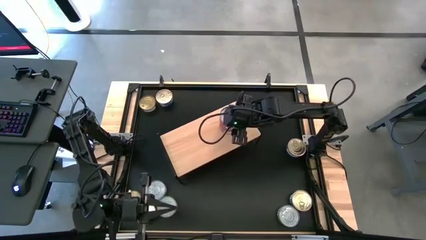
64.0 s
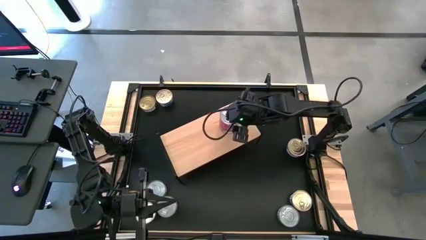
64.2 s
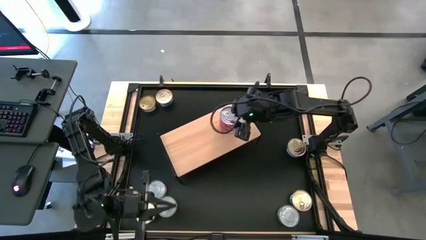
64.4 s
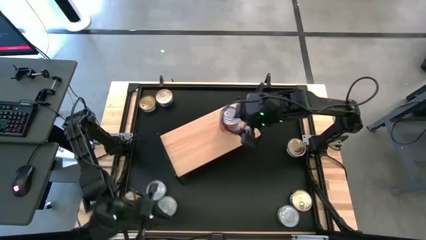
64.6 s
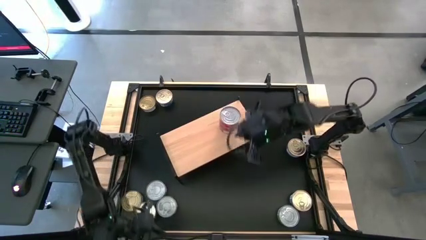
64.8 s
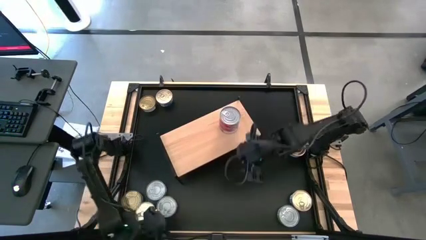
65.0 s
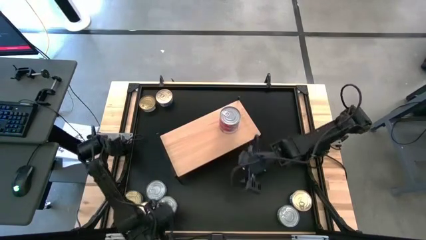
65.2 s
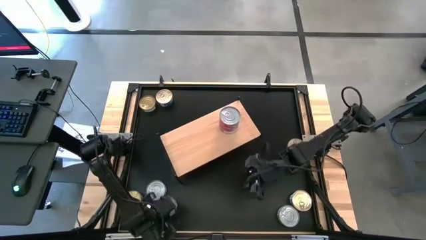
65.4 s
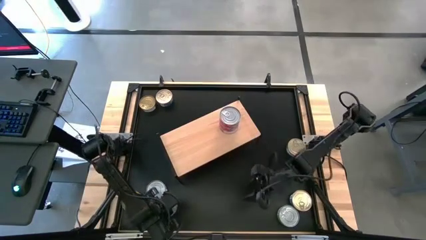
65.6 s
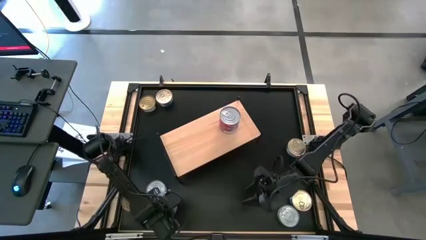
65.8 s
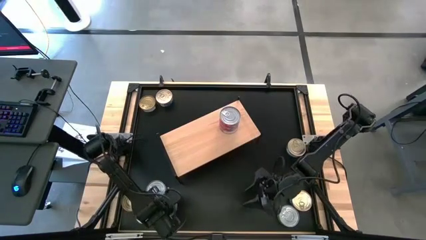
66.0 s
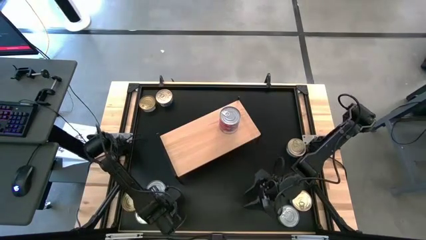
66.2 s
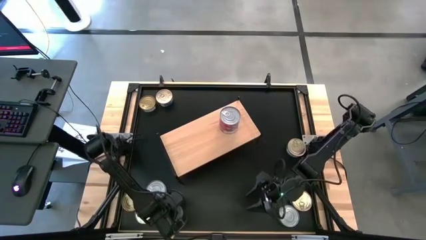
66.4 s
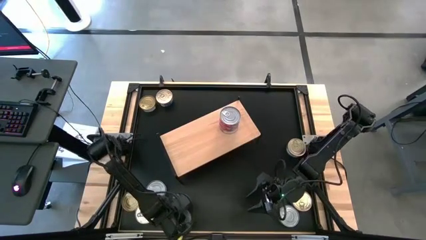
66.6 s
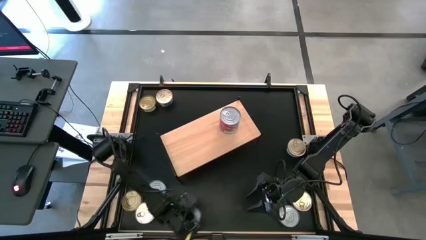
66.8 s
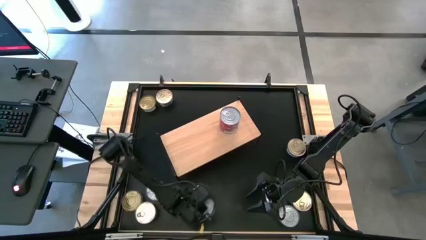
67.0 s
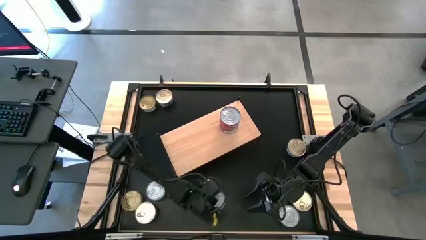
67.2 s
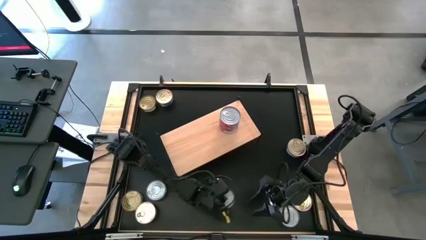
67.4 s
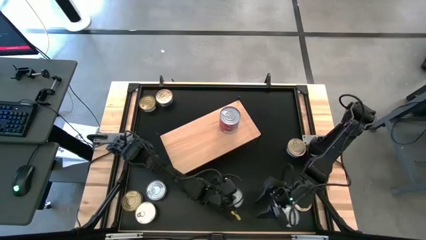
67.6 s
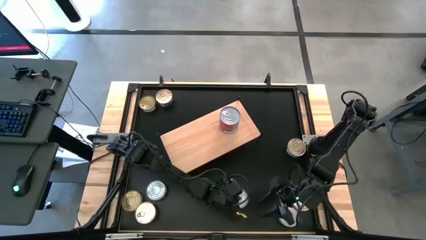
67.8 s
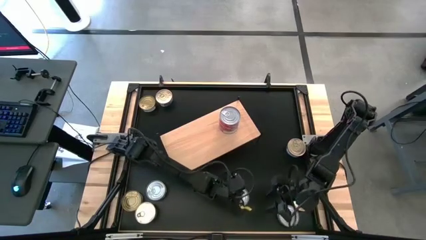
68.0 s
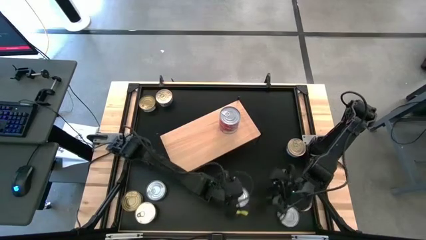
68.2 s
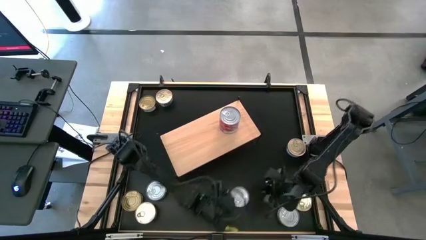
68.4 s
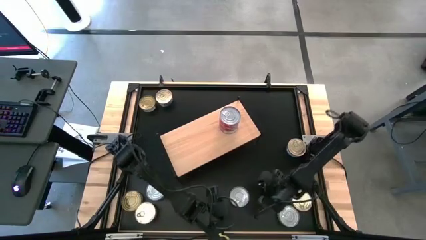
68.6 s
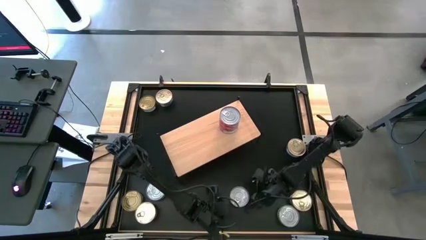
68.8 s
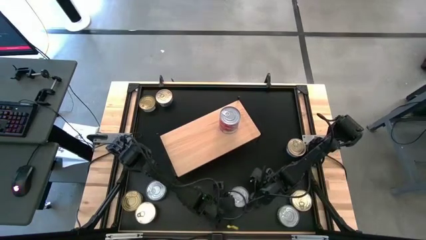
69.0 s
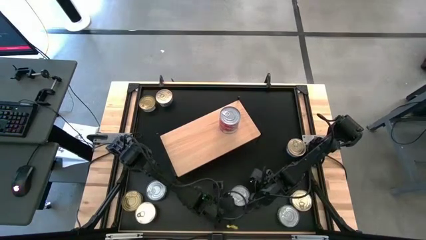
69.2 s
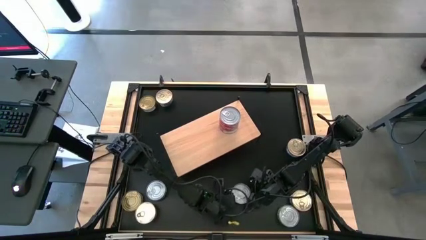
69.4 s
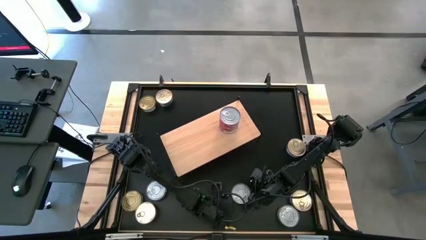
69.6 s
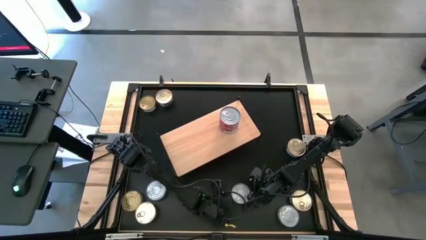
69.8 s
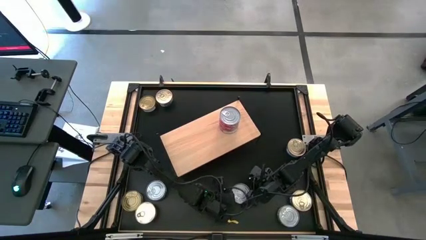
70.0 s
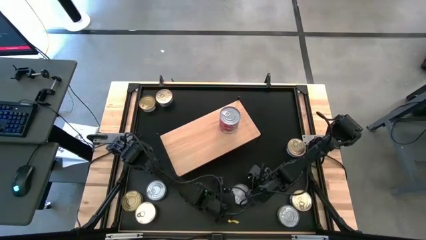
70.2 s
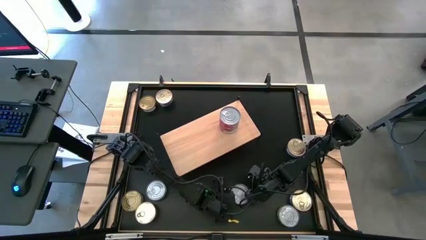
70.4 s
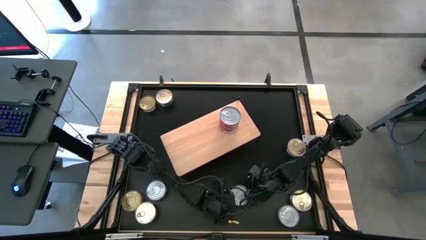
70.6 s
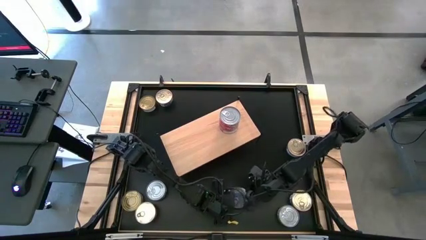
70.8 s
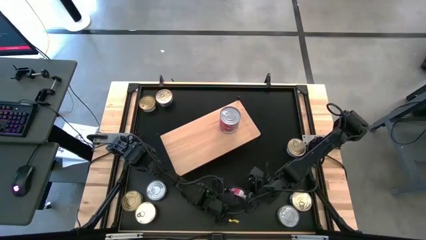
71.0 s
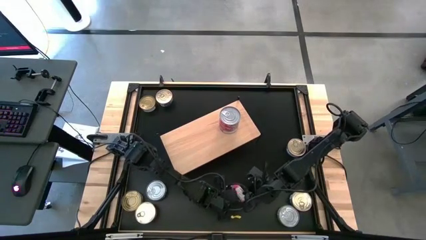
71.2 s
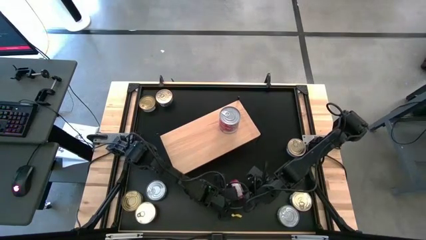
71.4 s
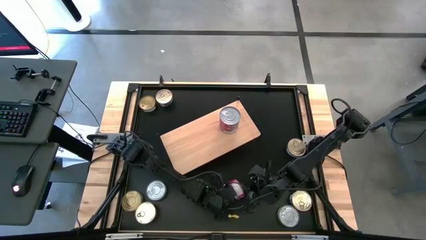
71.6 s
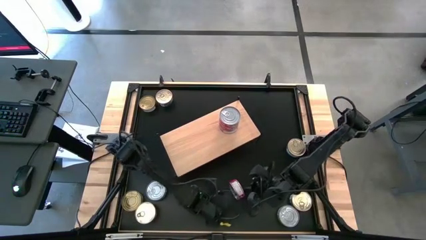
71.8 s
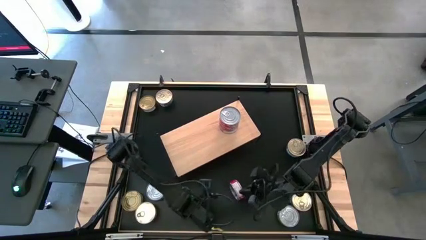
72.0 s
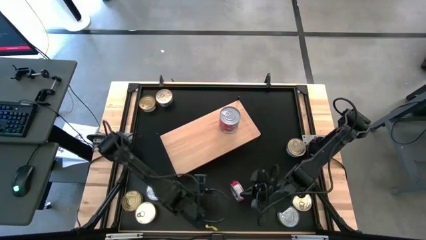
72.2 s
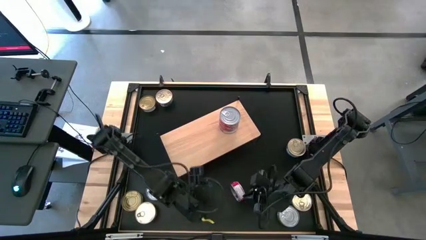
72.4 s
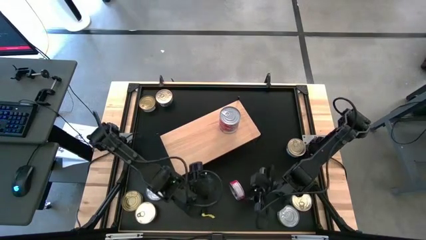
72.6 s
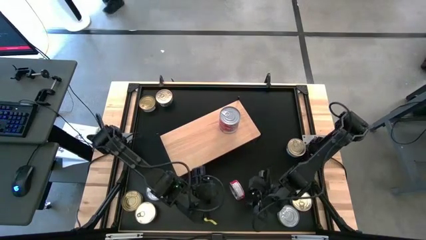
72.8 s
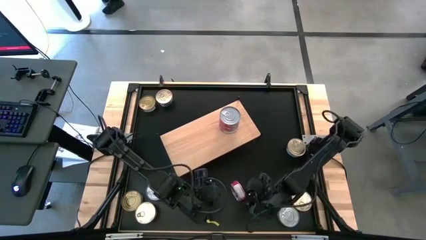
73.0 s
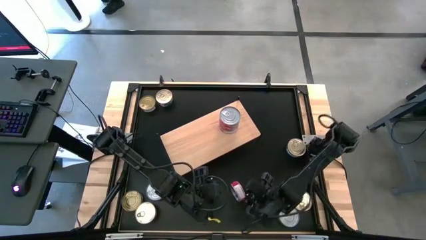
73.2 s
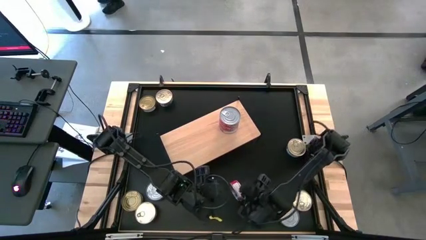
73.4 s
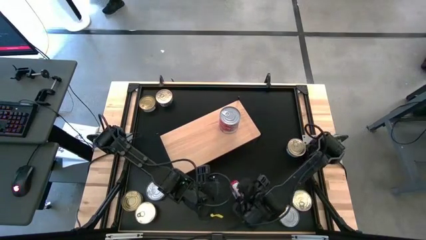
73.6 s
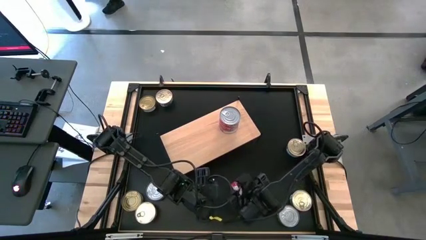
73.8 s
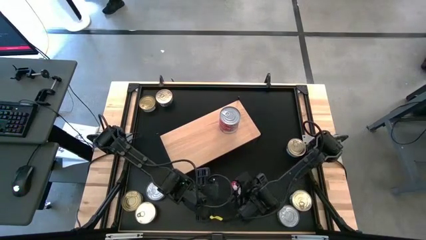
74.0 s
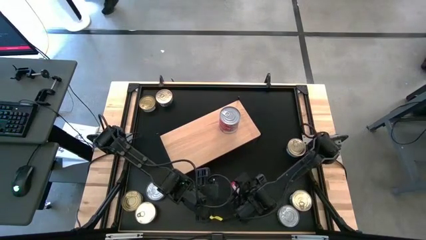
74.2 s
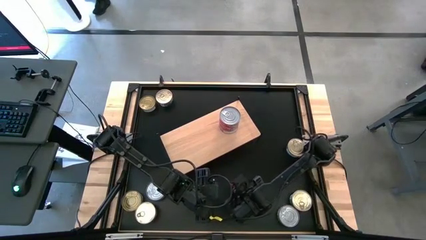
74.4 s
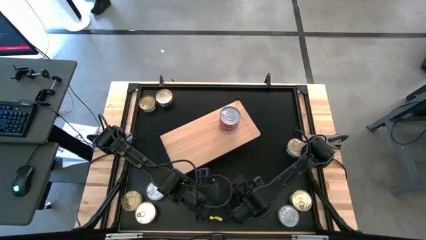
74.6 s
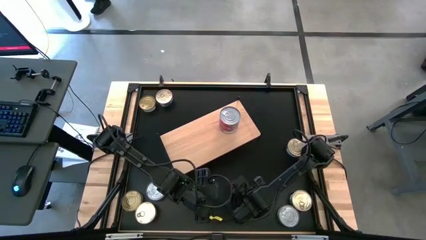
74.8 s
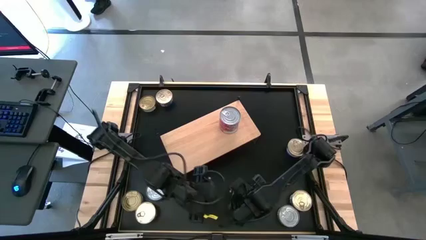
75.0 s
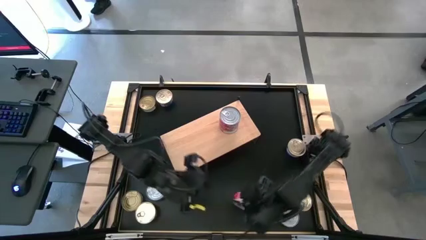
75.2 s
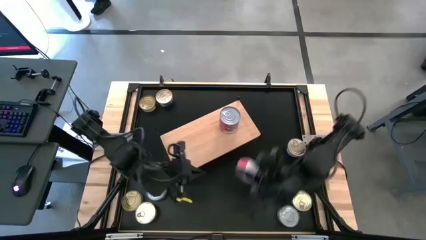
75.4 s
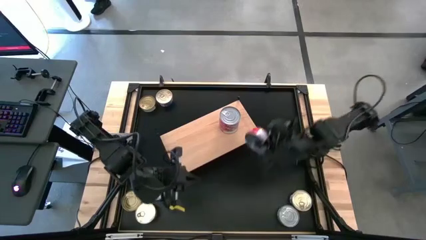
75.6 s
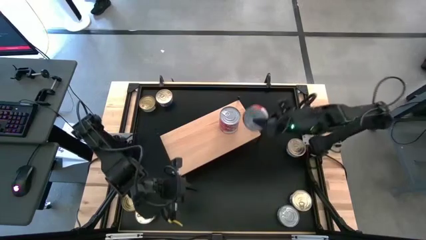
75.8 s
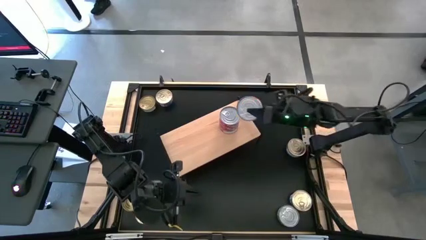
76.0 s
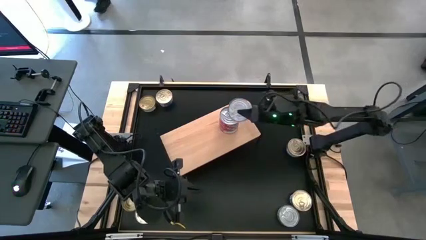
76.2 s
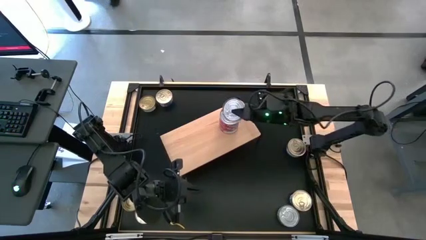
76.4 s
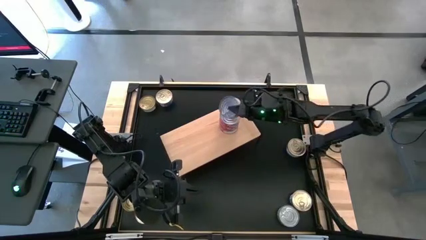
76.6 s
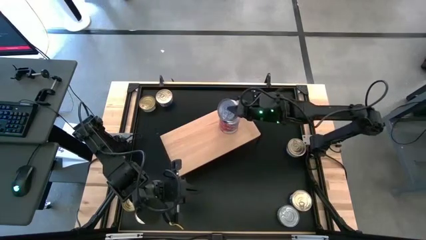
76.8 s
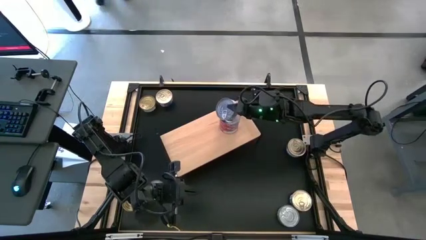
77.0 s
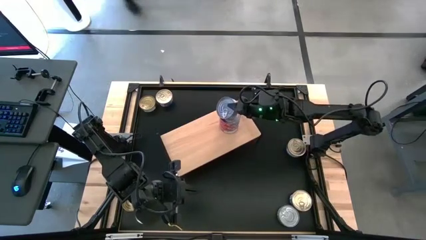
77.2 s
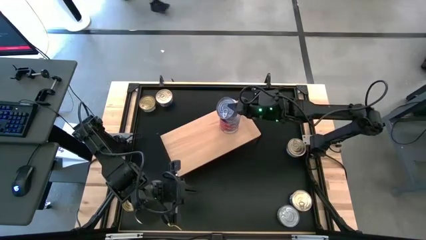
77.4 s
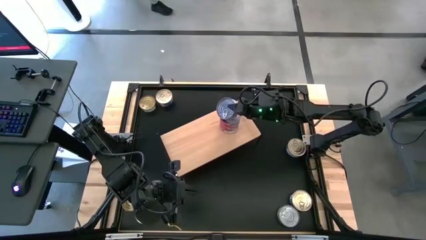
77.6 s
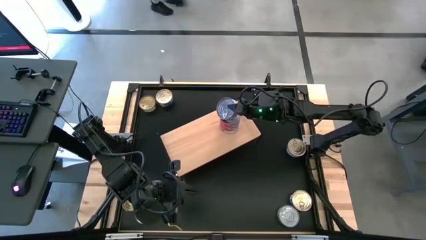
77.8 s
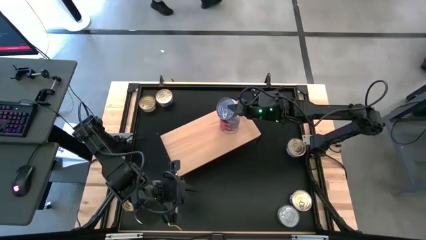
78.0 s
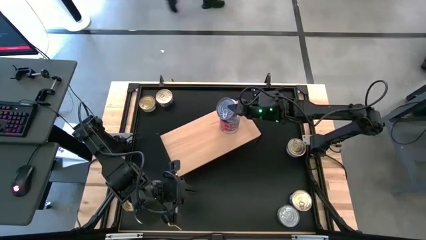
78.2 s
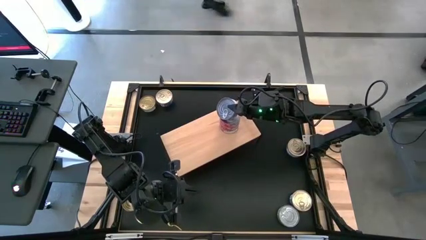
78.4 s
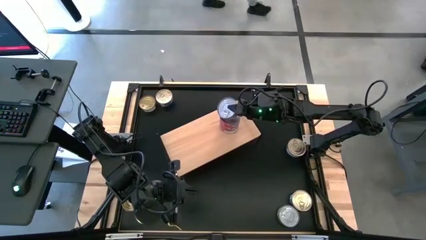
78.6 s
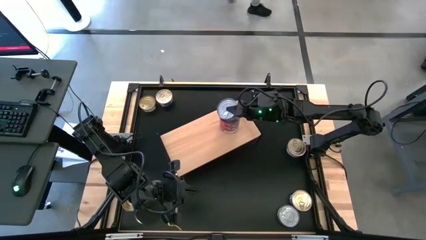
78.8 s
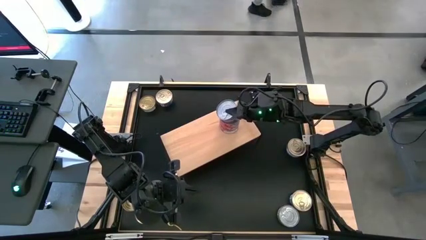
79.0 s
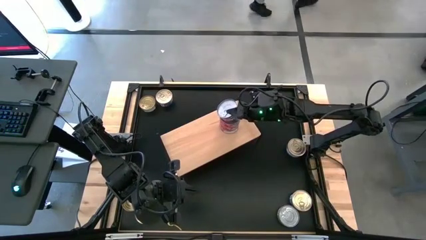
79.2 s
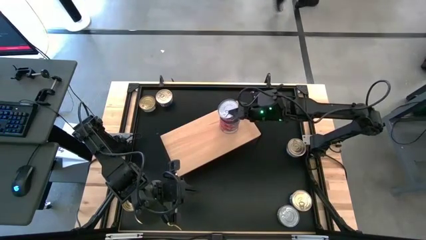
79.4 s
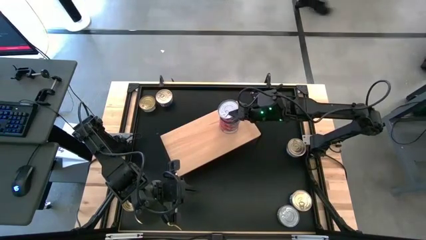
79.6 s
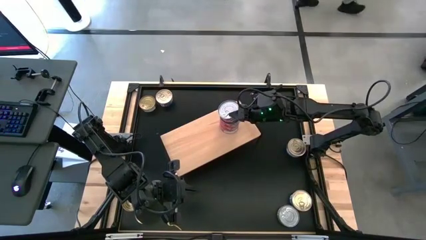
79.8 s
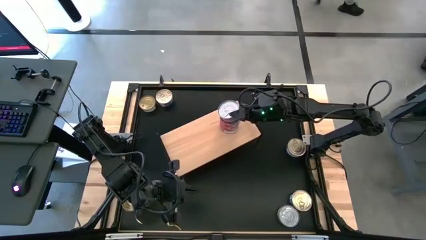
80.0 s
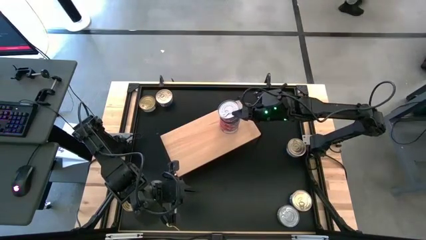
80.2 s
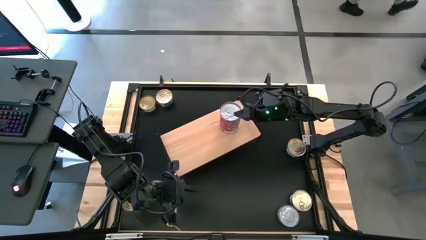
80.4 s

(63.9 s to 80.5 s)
Task: Stack canned seafood by type on shelf
Stack the red tuna can on the top of the other red tuna cans on the shelf

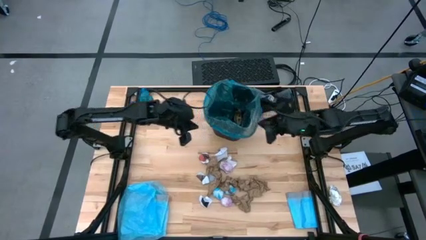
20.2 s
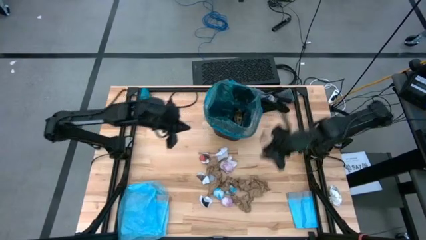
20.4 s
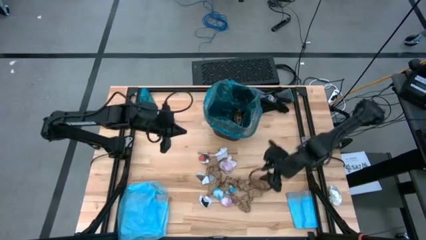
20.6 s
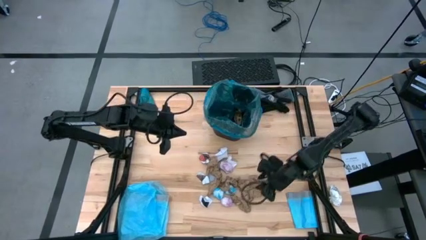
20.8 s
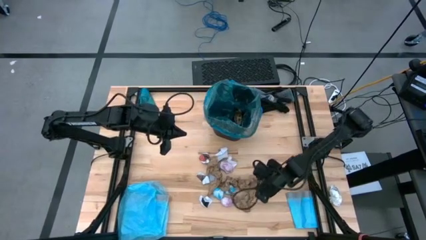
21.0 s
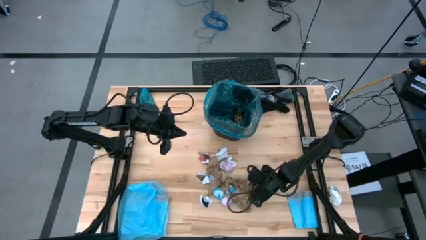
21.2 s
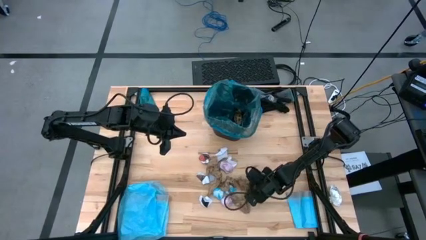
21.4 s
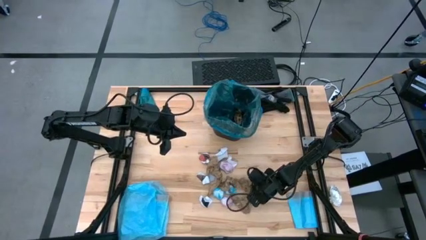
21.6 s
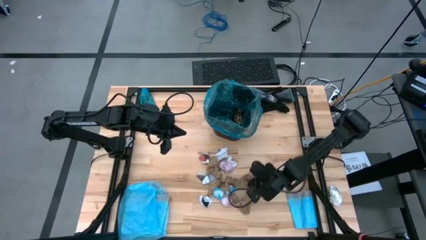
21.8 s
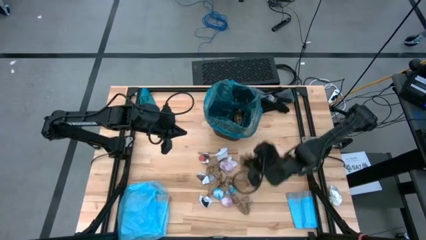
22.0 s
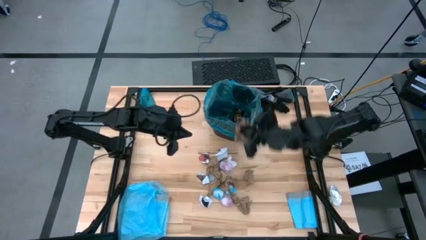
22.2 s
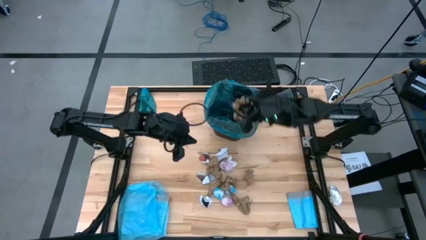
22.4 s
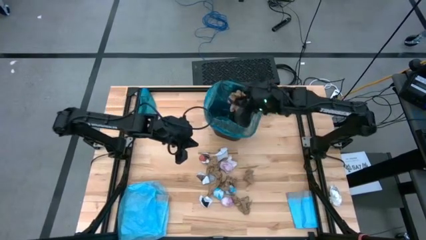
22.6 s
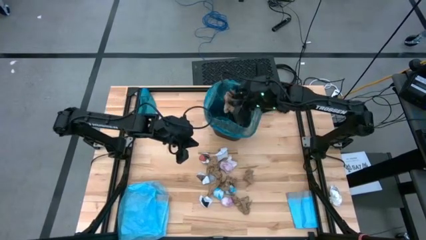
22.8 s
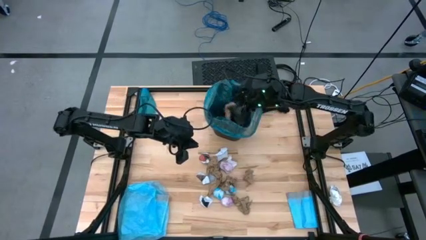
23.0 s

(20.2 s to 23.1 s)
Task: place trash/remove bag and relplace
Put the brown napkin into the blue trash bag inside the black trash bin
